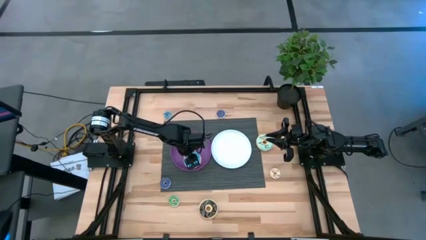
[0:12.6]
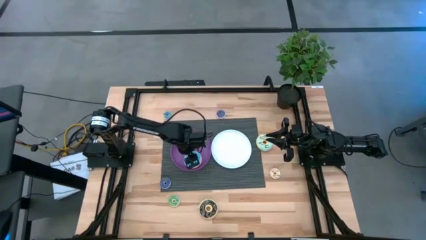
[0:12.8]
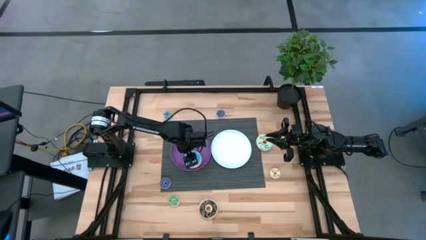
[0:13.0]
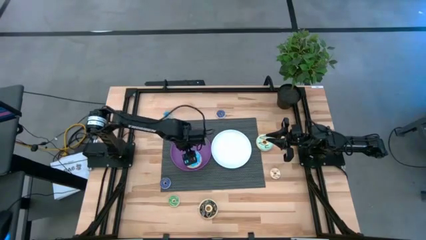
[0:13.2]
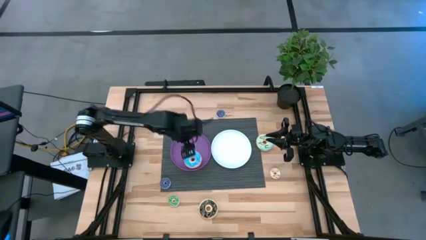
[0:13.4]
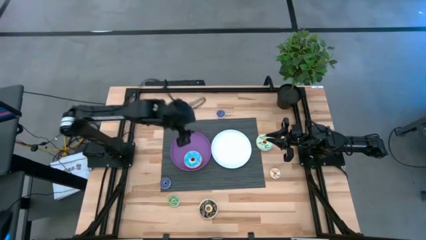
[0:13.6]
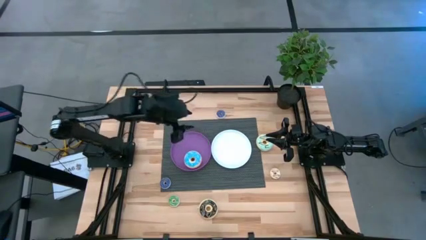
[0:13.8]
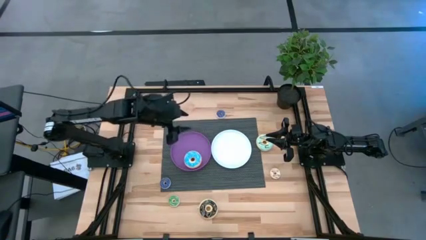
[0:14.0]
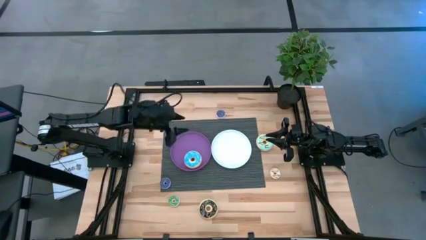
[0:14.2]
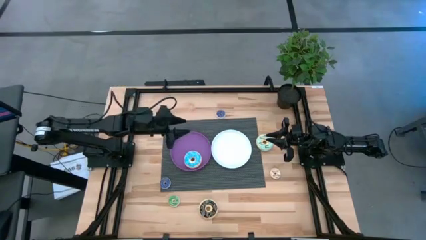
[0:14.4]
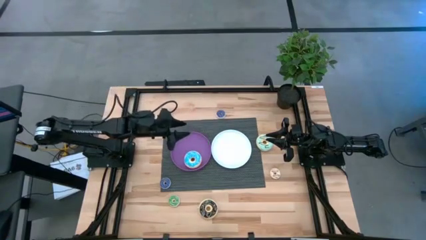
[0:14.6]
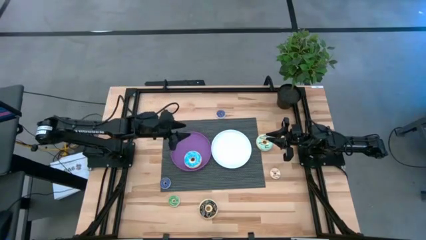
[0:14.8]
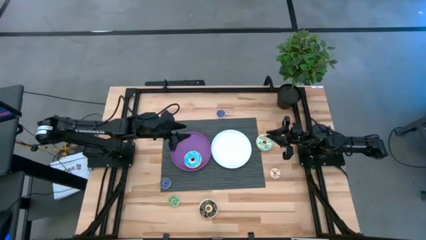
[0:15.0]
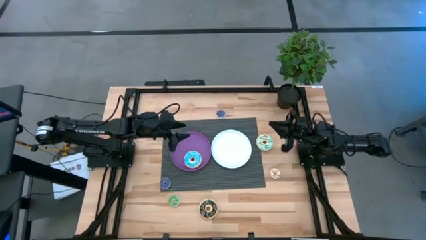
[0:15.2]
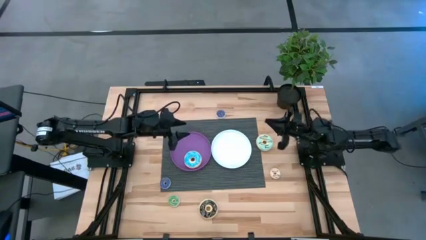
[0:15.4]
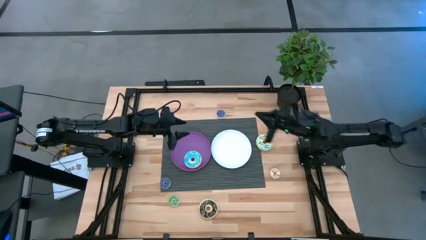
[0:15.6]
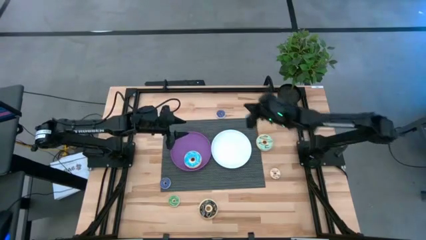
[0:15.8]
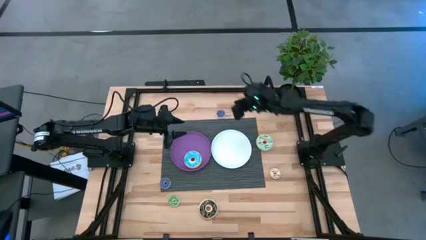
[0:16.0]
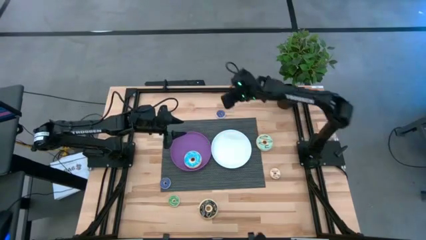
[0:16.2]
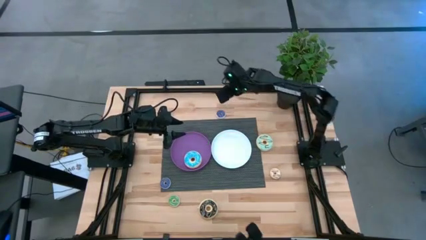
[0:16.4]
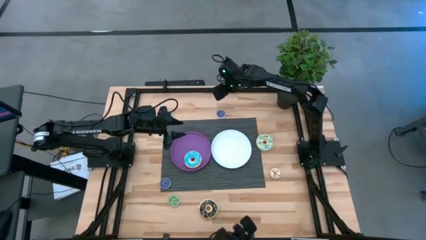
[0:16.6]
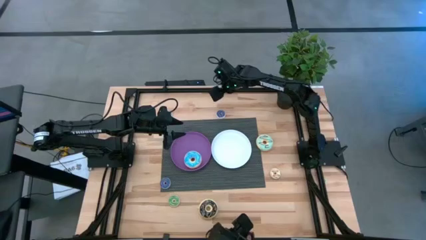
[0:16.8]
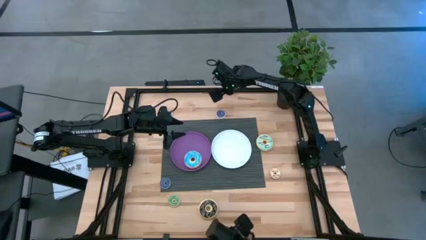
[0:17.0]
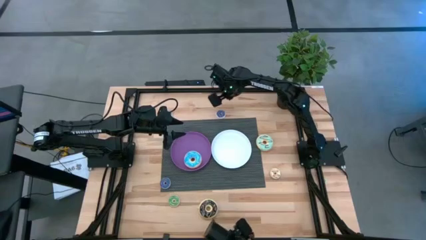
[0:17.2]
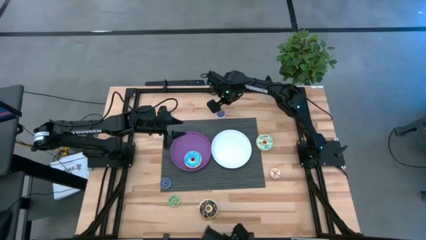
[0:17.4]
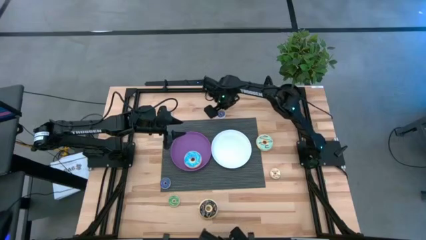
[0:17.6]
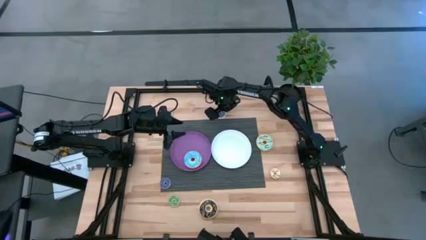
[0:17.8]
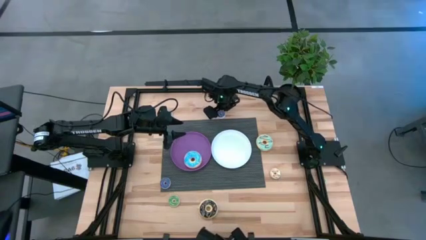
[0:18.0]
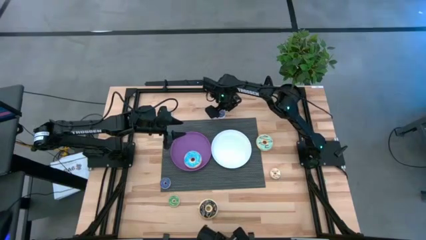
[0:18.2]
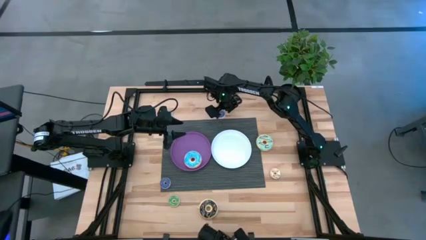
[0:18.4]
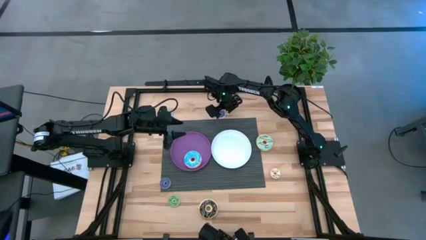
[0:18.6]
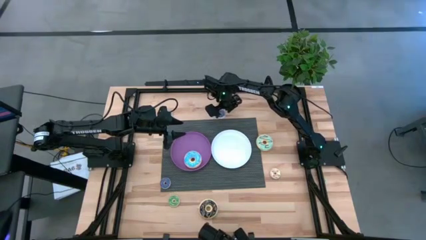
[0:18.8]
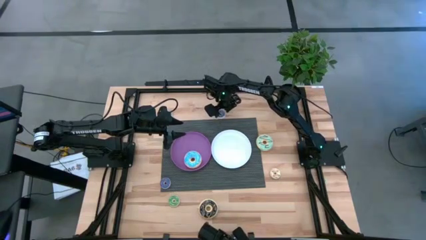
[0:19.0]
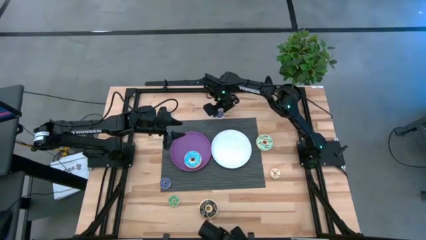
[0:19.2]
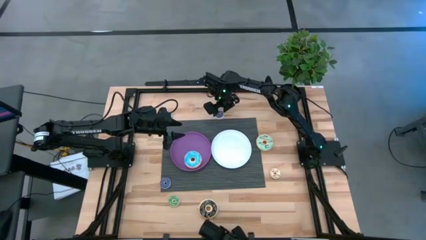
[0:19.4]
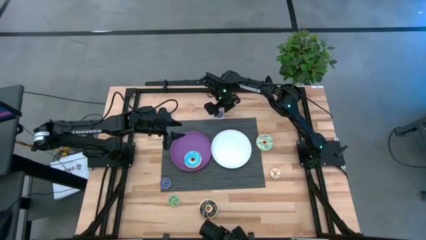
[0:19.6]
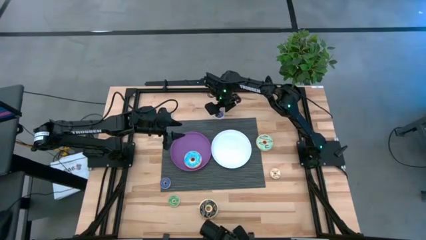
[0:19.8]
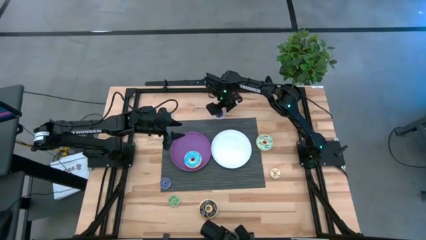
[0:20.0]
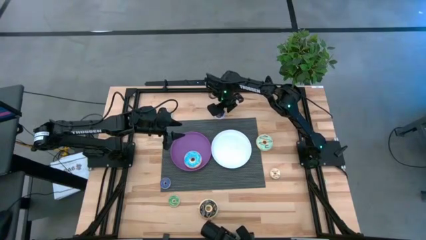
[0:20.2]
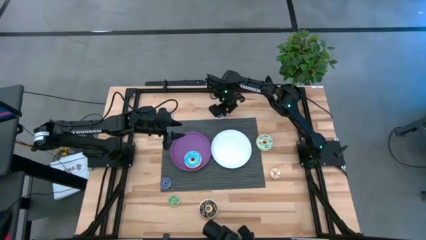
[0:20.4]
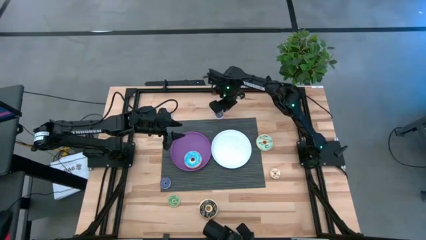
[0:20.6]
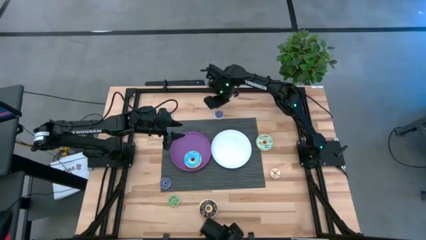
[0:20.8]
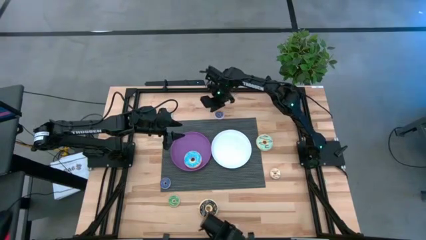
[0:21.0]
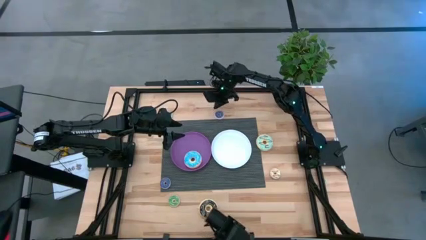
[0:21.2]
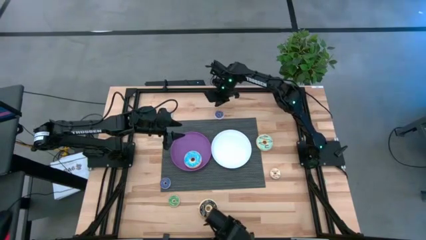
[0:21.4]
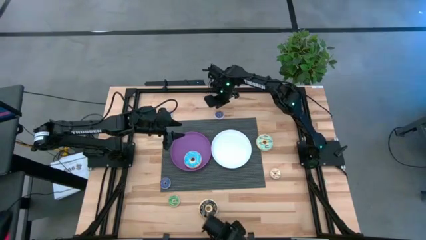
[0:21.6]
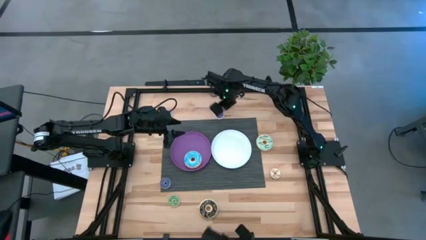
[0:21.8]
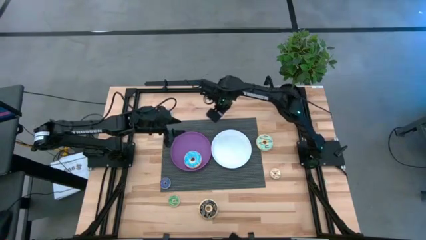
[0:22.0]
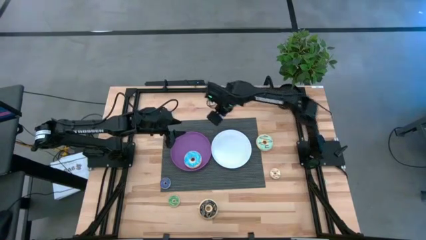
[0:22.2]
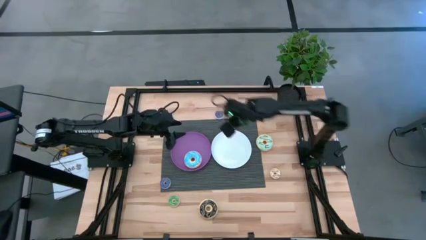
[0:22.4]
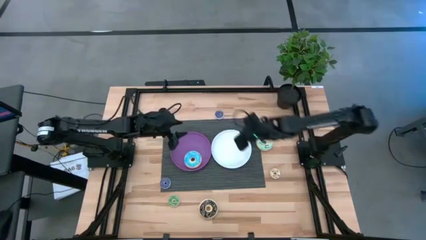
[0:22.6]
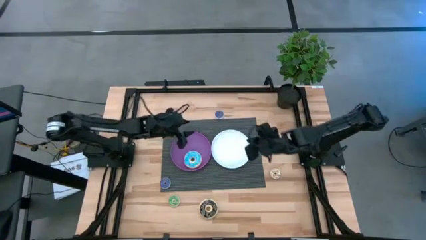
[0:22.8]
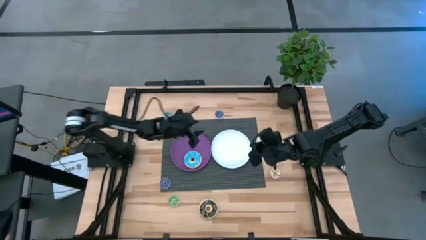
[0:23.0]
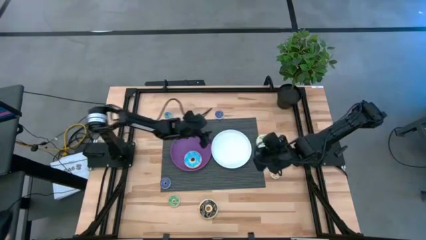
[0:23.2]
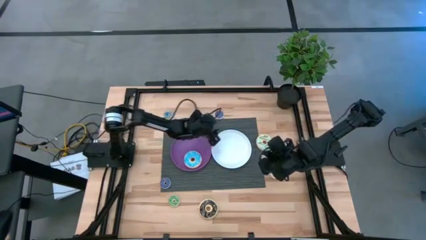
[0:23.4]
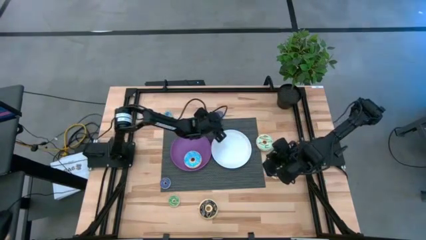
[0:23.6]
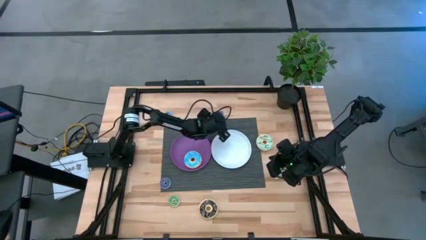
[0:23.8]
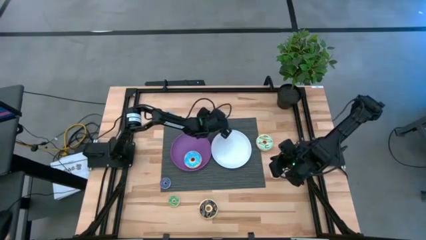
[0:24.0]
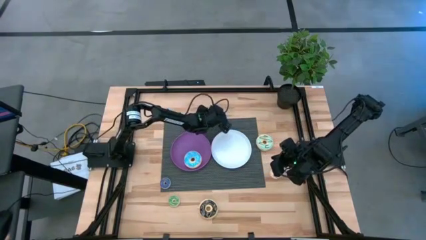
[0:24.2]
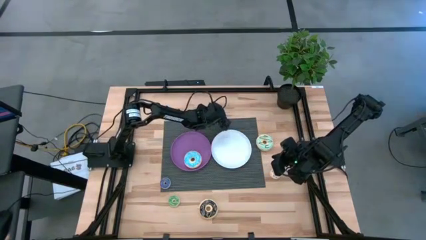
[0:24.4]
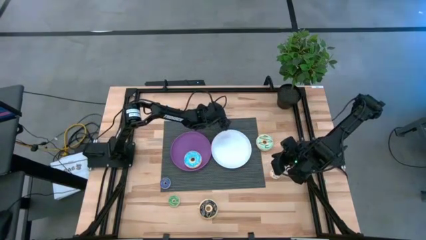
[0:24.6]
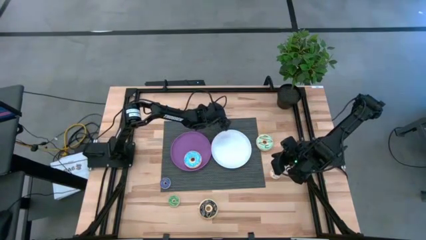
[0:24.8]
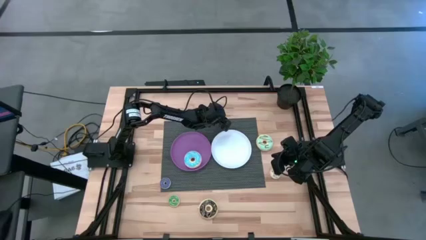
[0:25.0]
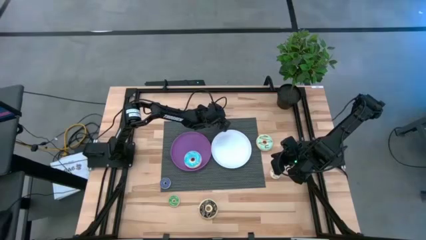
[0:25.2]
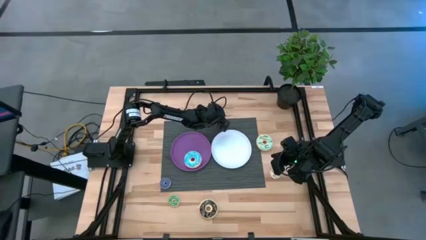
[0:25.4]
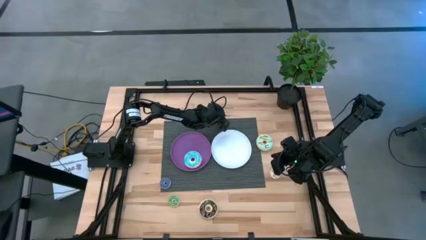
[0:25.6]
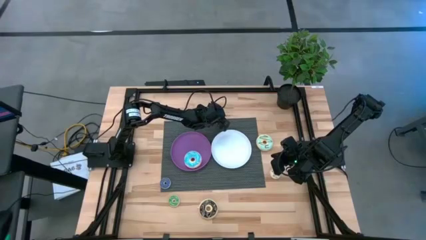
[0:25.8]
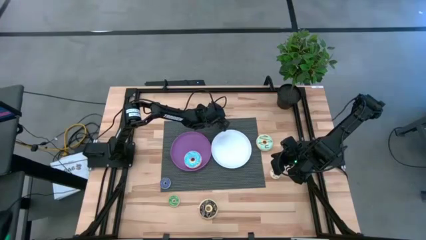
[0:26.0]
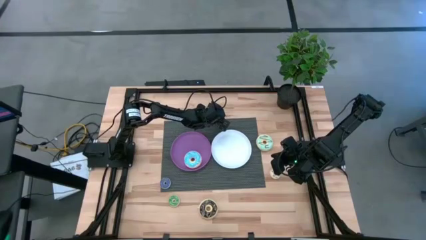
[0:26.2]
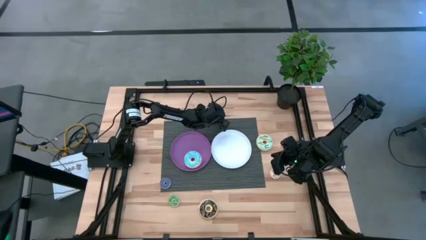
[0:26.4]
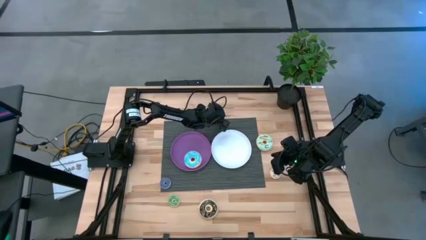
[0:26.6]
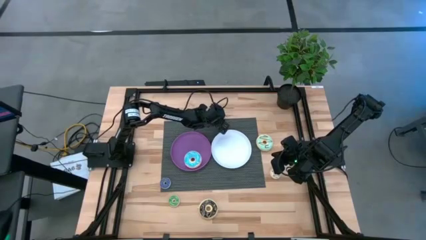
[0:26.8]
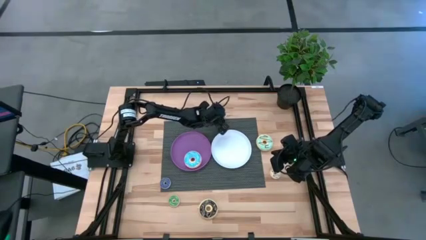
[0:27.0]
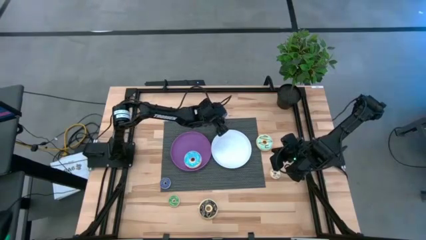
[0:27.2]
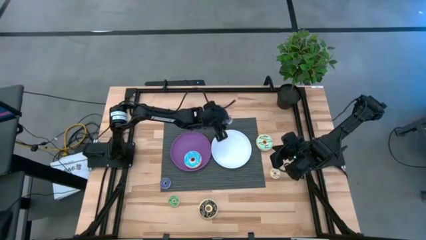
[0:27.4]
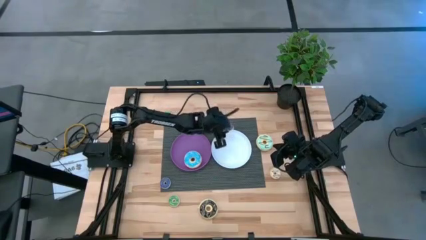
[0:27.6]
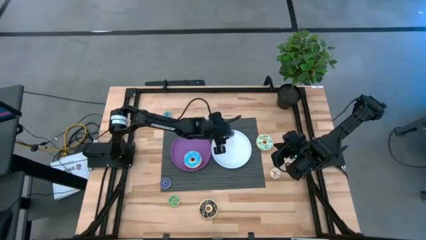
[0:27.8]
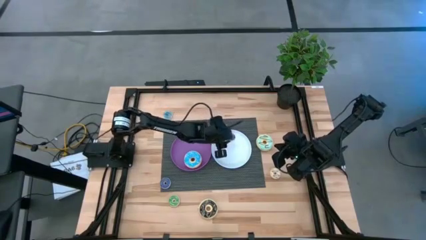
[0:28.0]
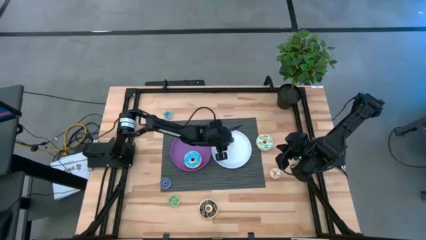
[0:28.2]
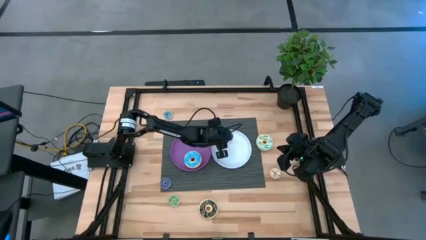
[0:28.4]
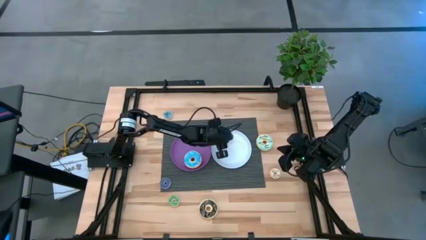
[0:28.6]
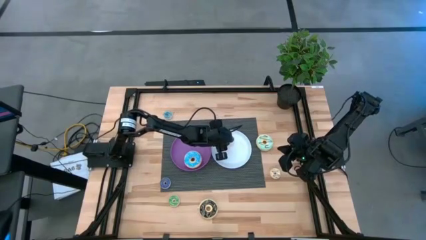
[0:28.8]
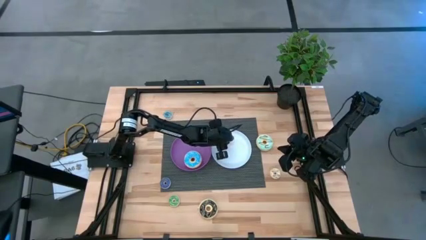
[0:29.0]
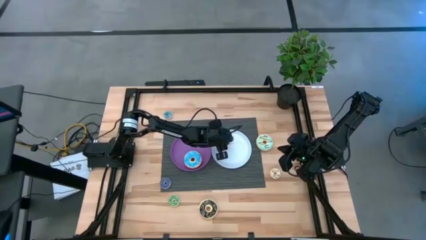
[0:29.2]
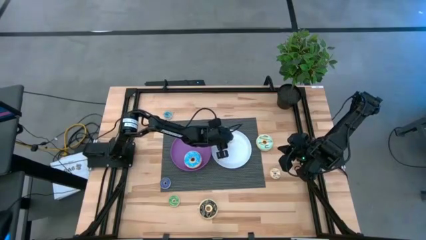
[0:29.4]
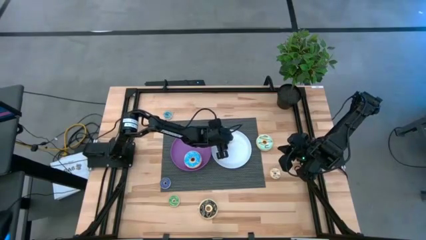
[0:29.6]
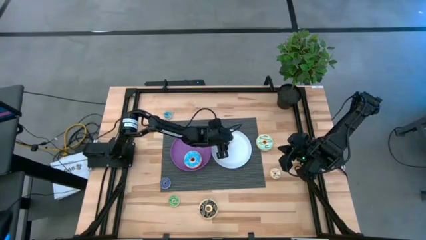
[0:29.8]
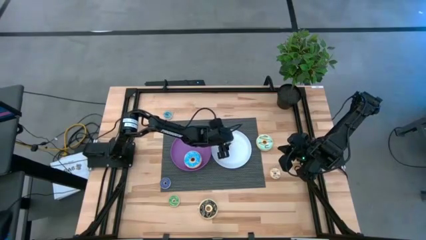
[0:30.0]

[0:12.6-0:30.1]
Task: Pick & Place donuts
Put the small dark blue donut on the white plate
